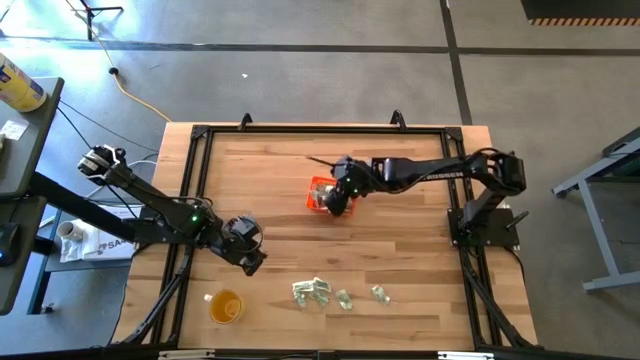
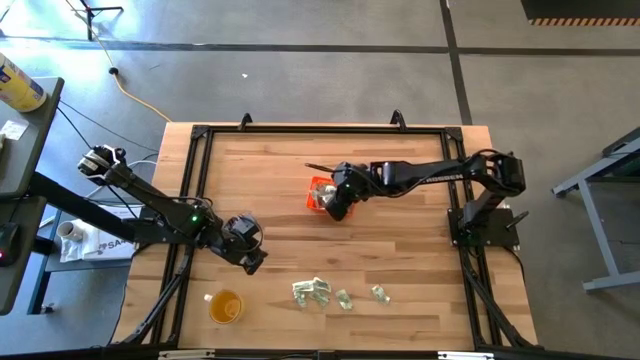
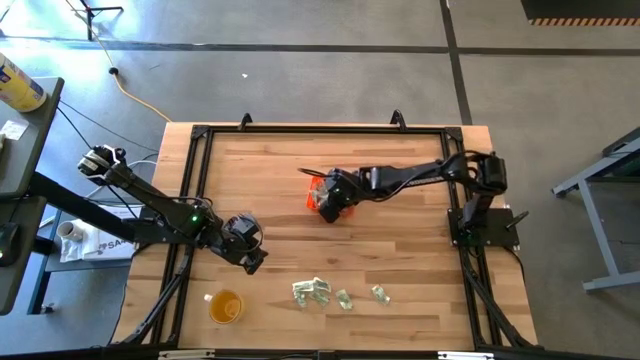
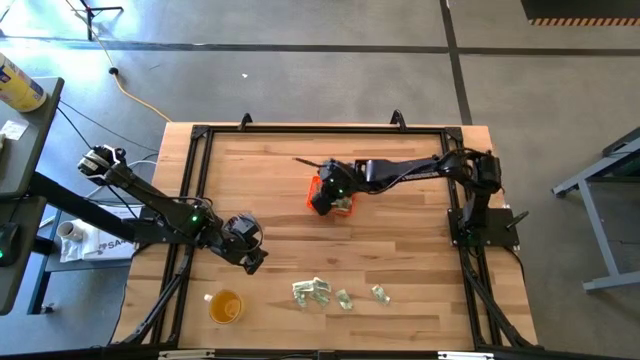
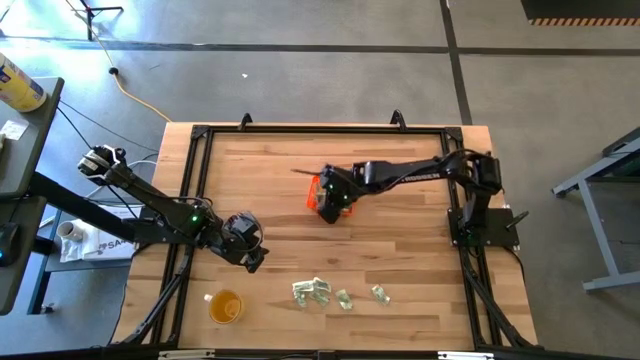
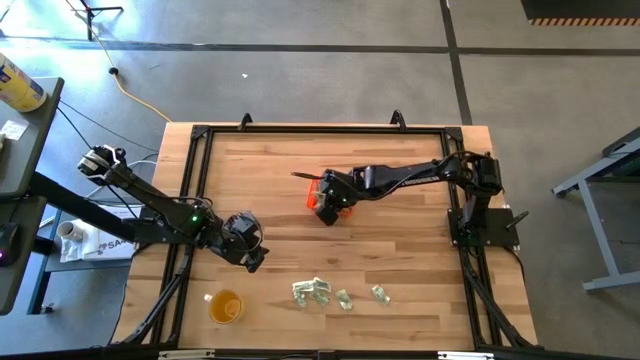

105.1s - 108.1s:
Task: Pick and place Stevia / Truvia into bins
Adjust the stevia packets in the basket

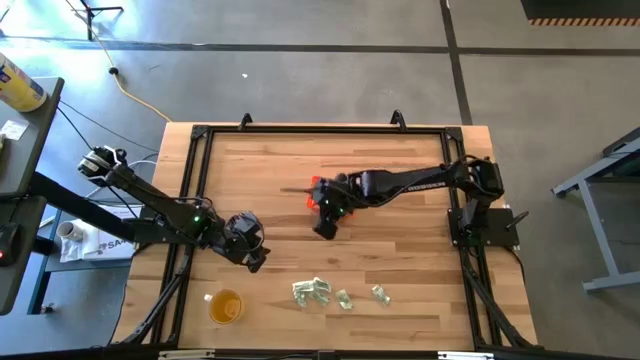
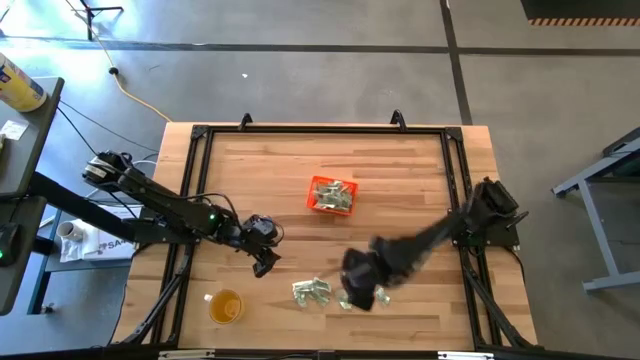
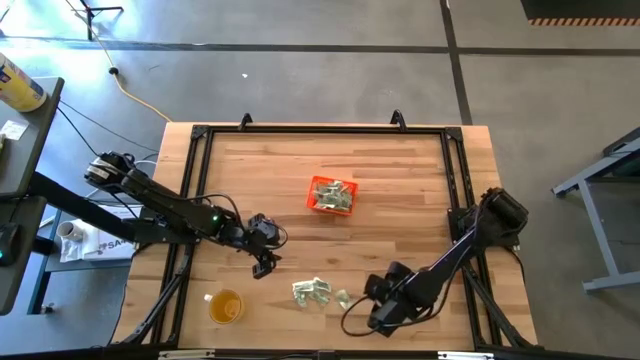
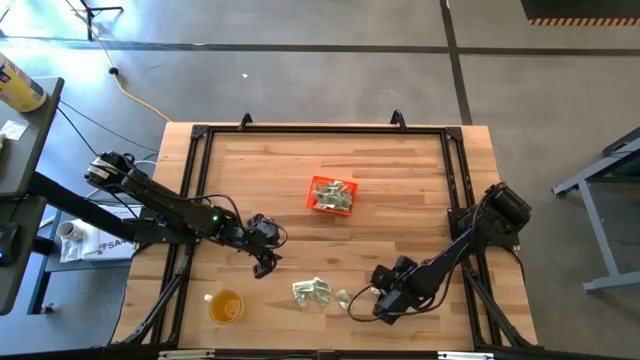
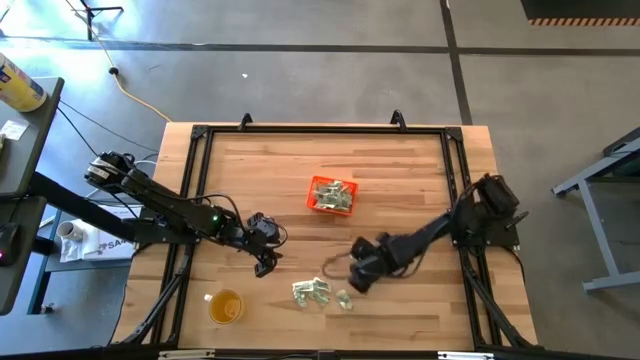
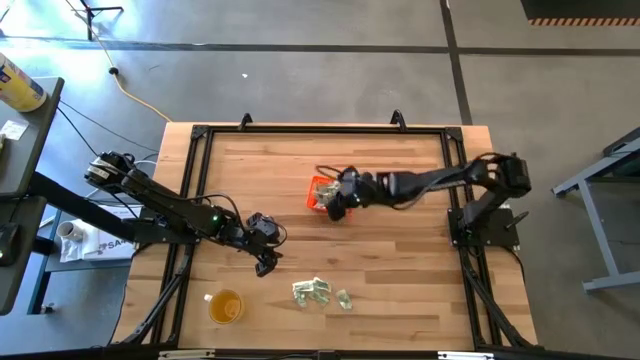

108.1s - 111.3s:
Put the stevia packet into the basket

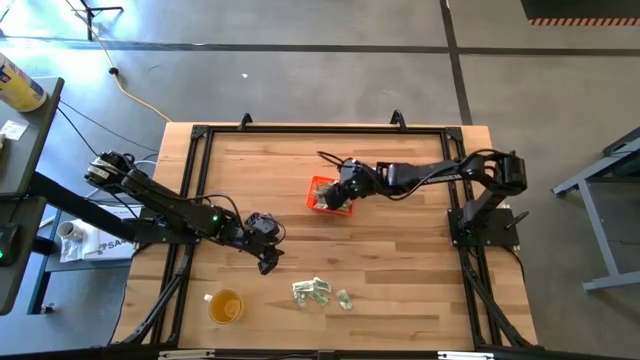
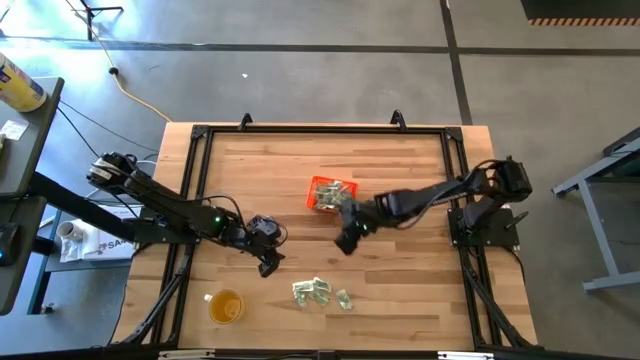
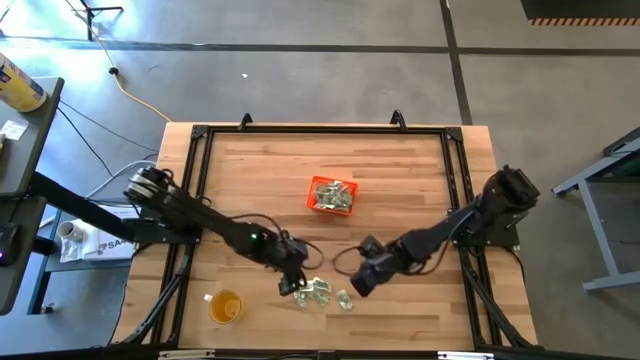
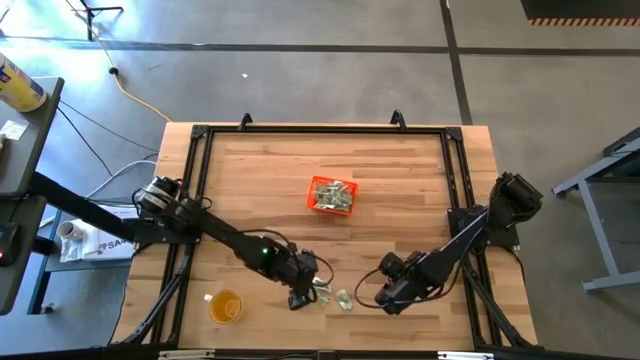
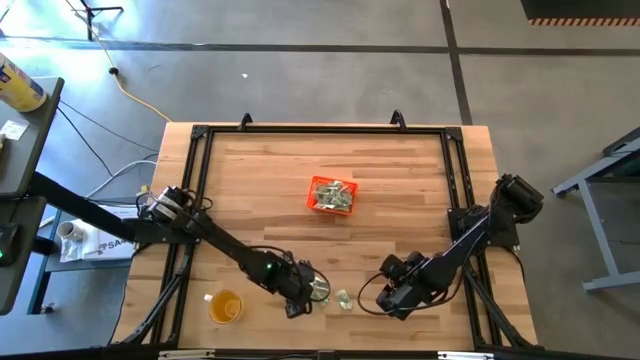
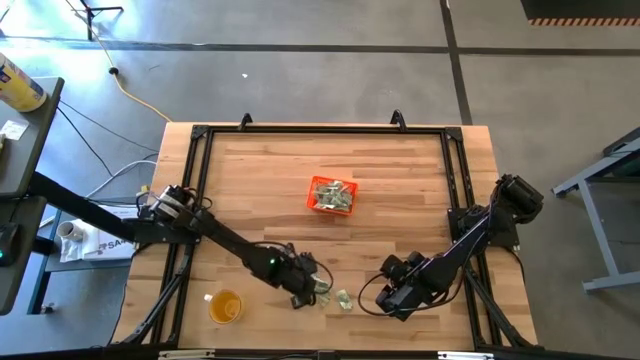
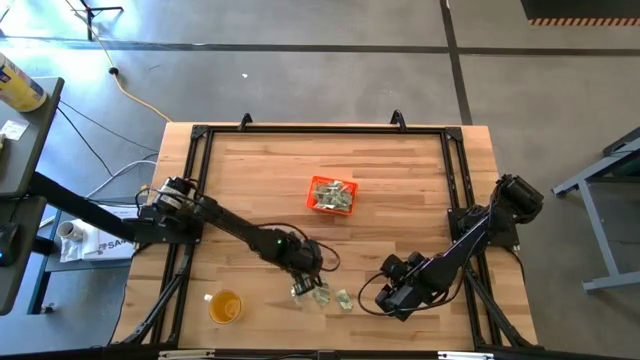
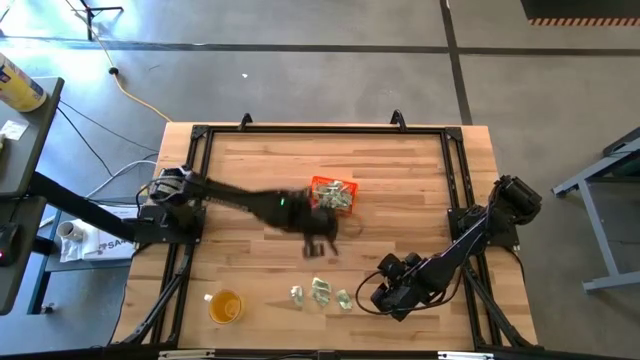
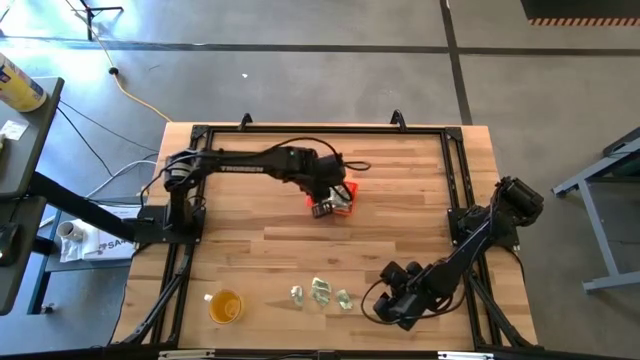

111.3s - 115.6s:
Put the stevia packet into the basket

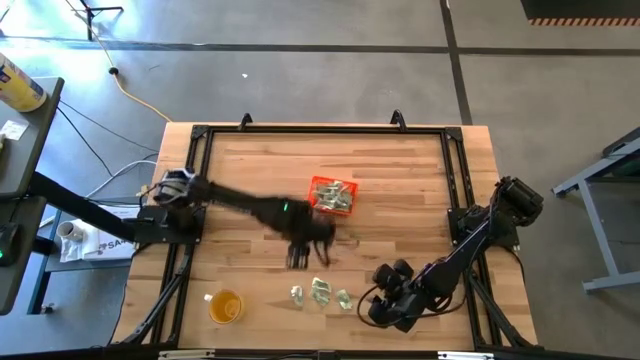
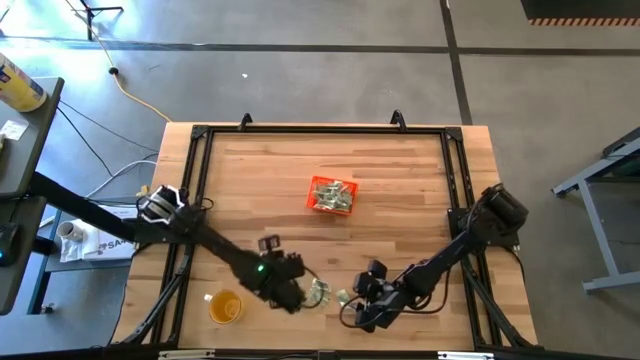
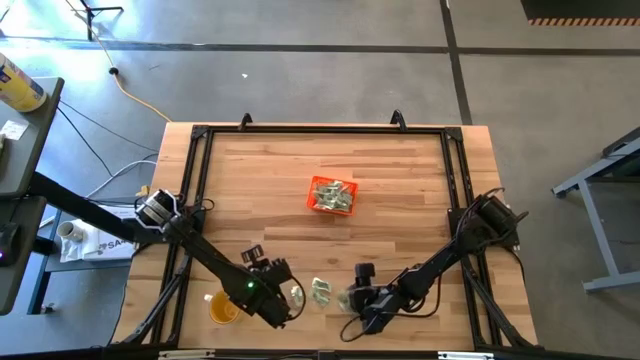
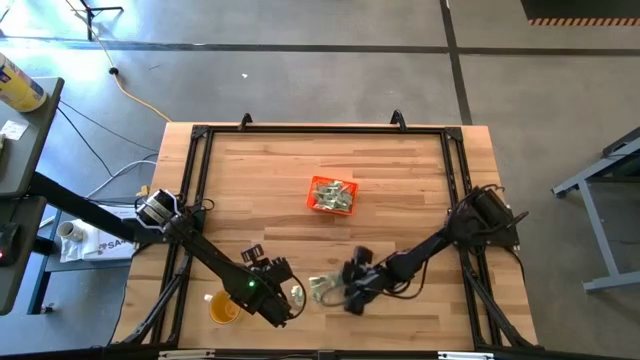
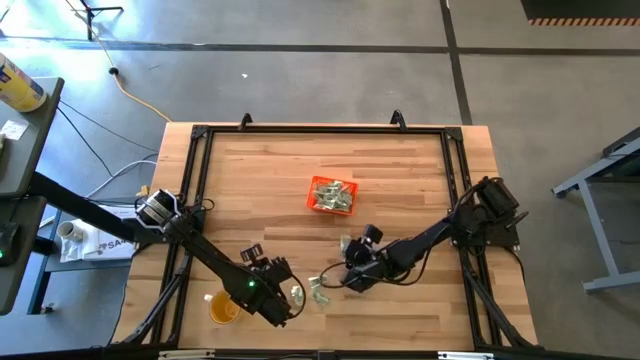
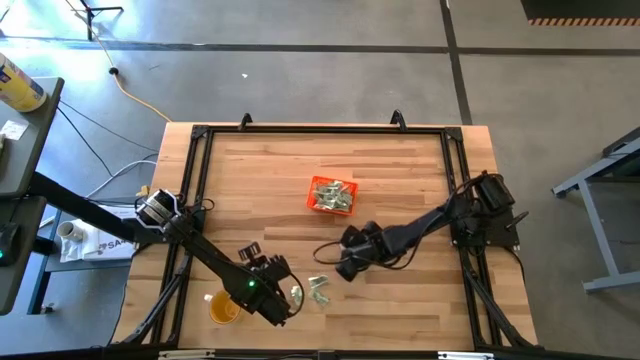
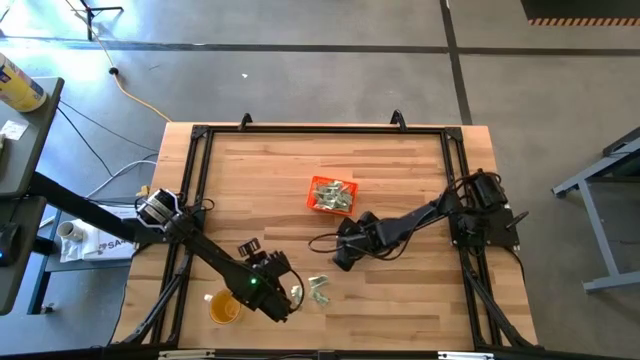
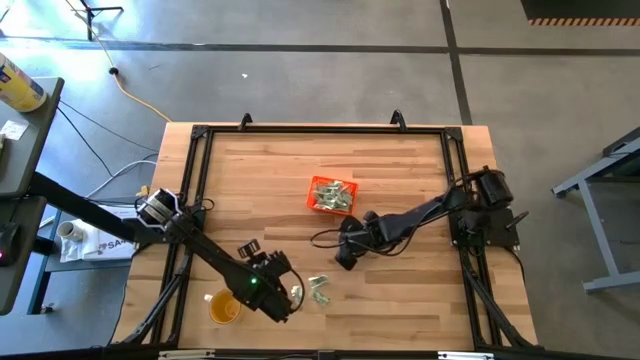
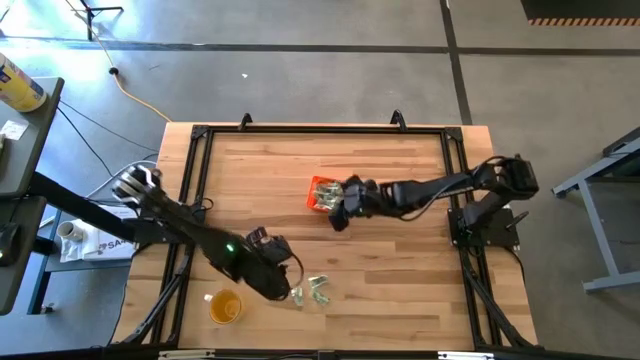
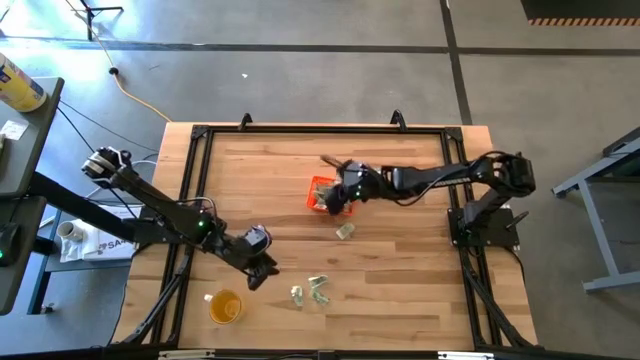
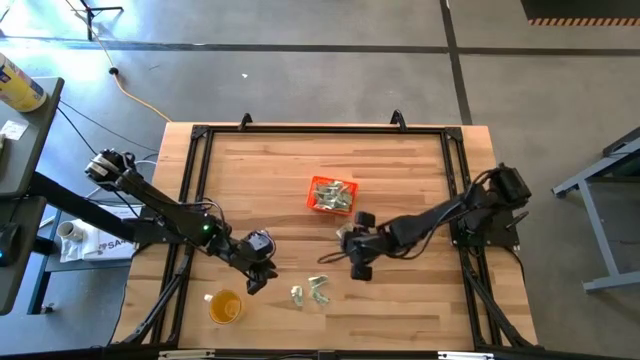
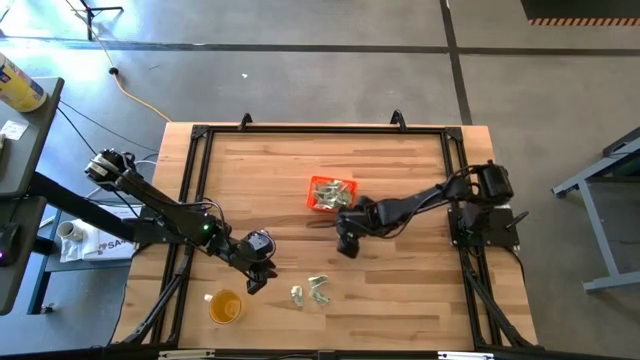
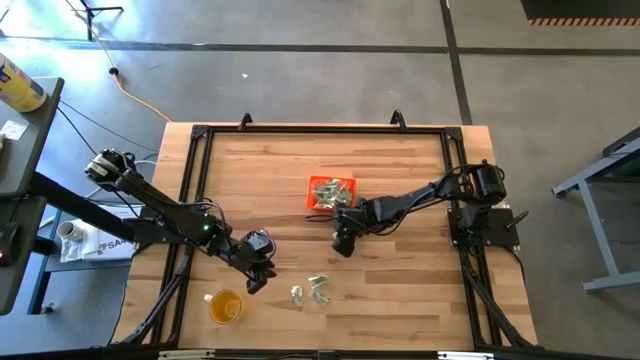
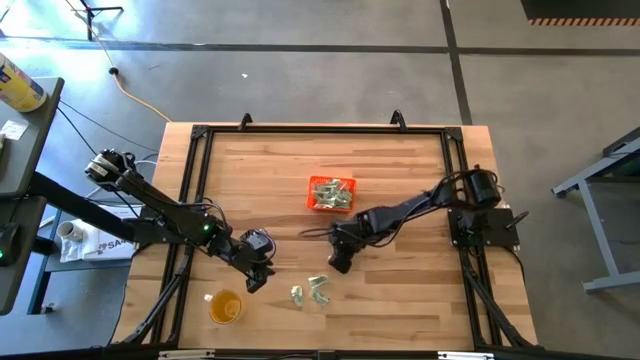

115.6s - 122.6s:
Put the stevia packet into the basket

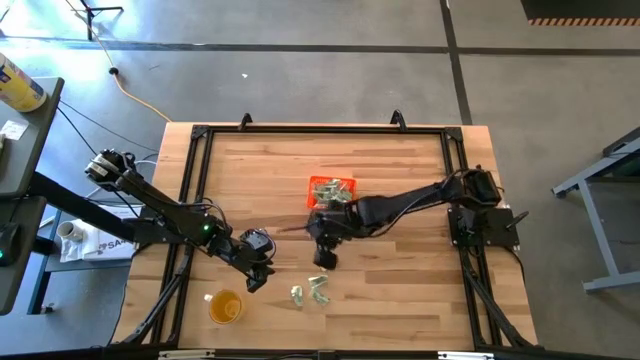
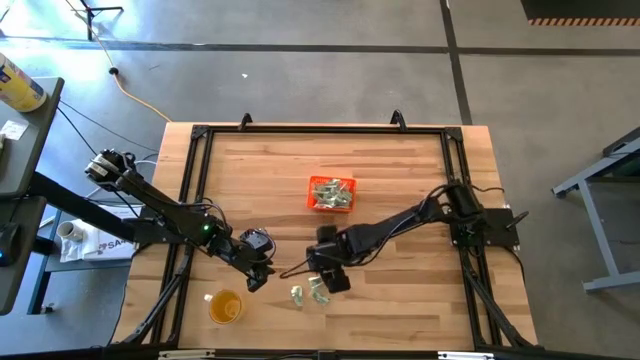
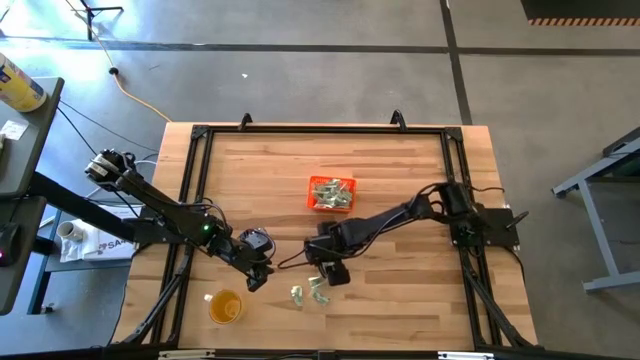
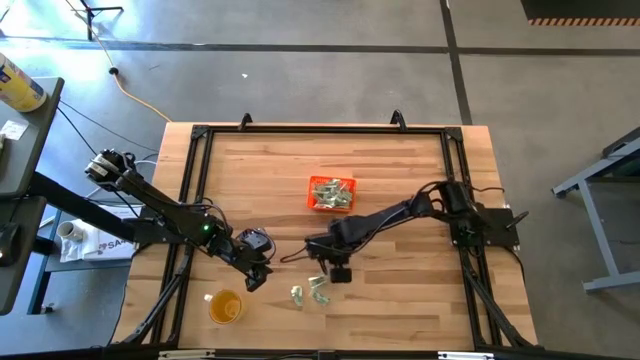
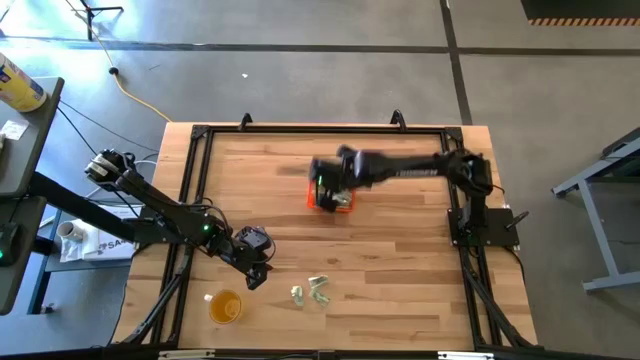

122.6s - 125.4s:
Put the stevia packet into the basket

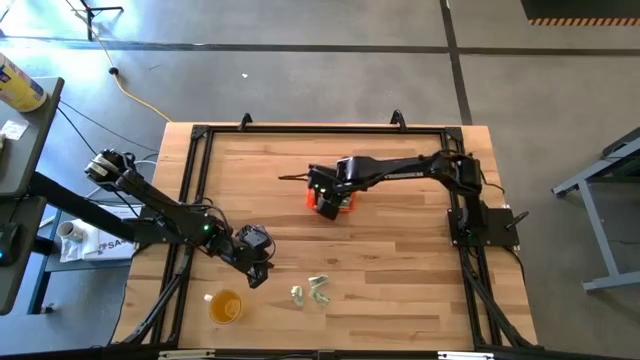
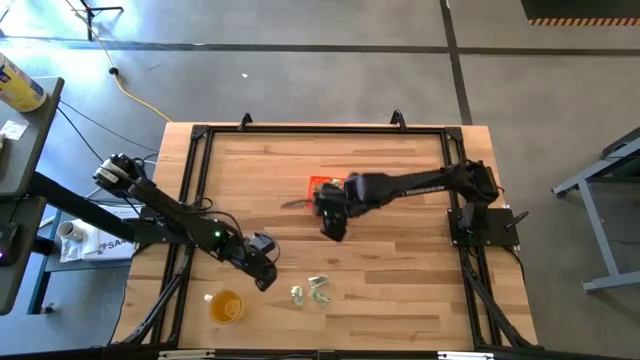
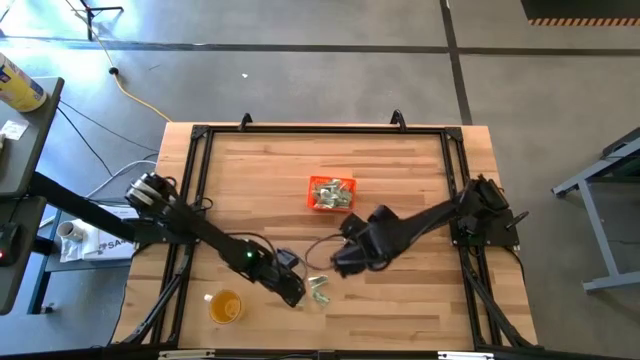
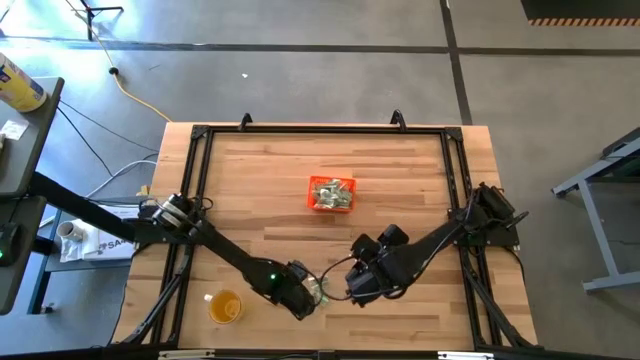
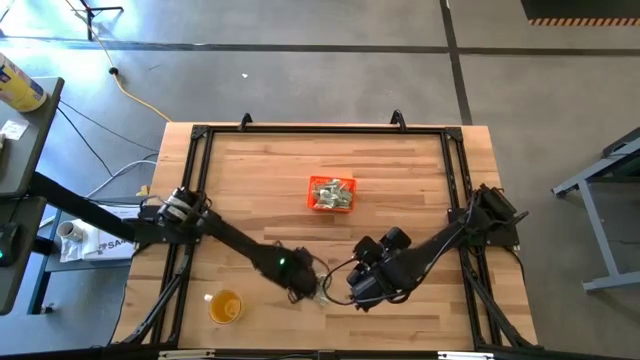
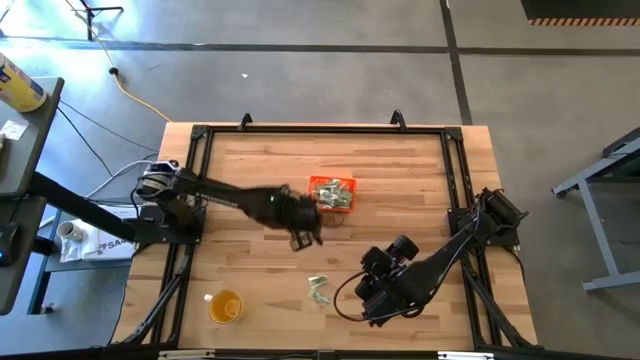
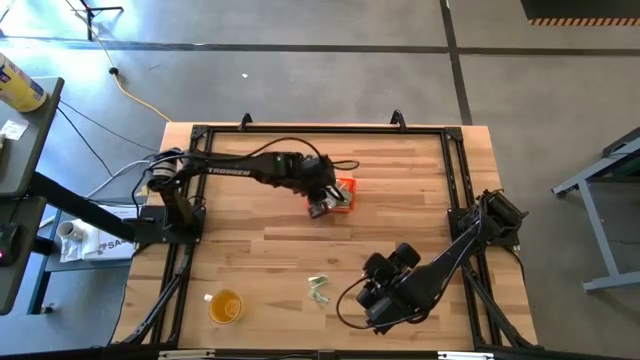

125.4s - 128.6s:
Put the bottom left stevia packet into the basket
